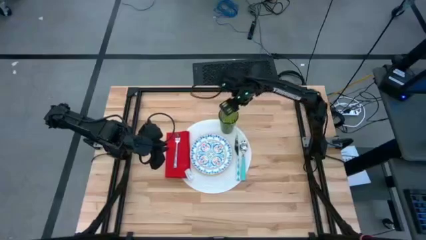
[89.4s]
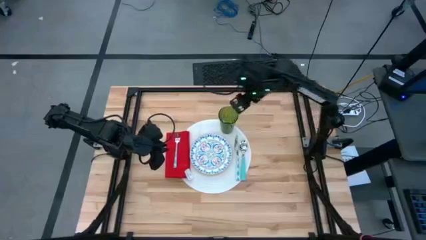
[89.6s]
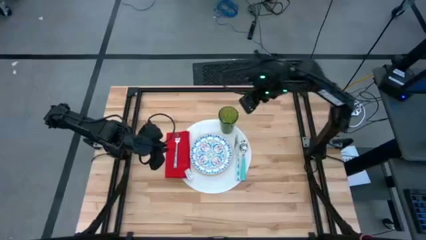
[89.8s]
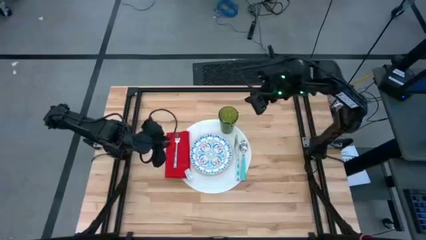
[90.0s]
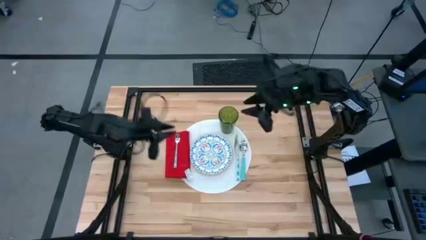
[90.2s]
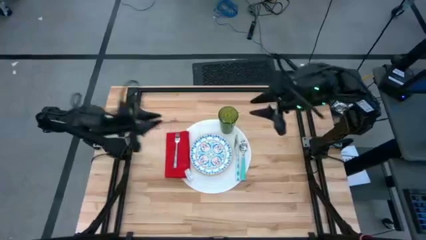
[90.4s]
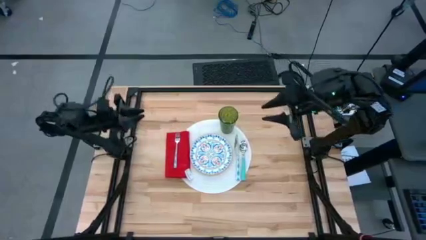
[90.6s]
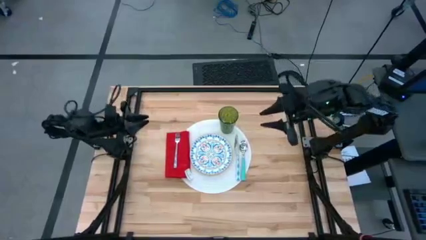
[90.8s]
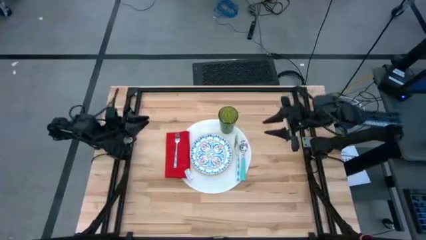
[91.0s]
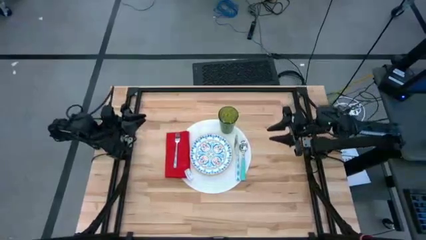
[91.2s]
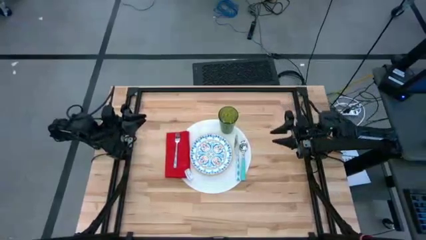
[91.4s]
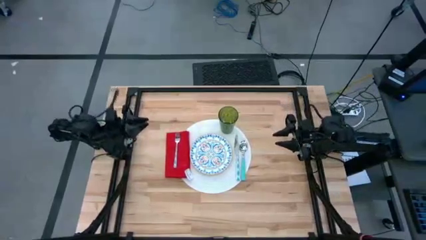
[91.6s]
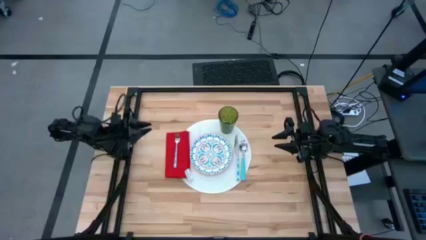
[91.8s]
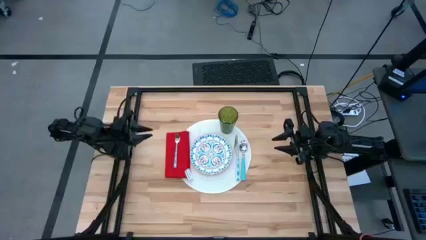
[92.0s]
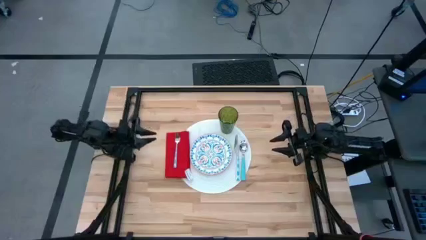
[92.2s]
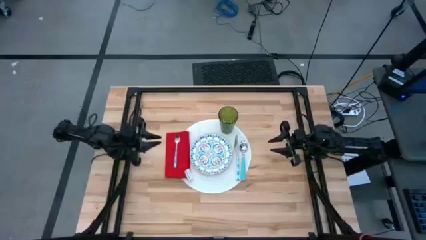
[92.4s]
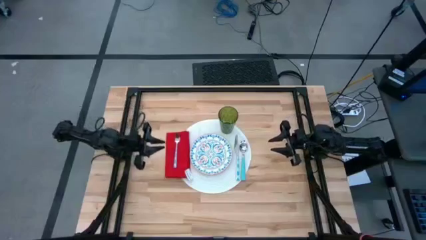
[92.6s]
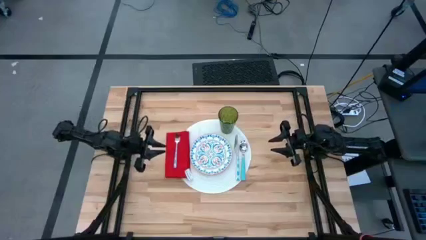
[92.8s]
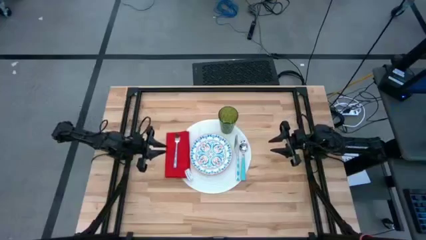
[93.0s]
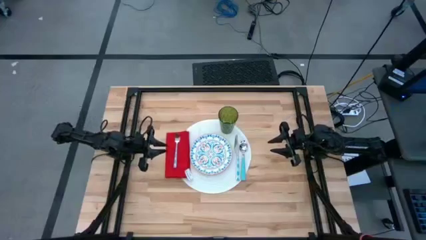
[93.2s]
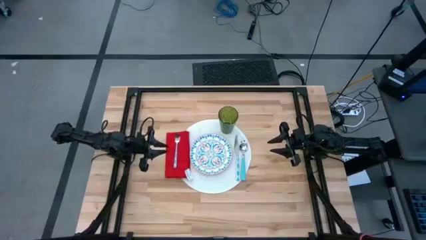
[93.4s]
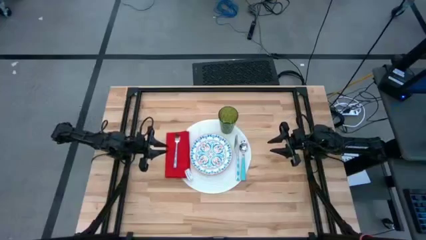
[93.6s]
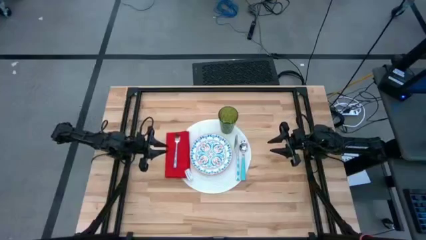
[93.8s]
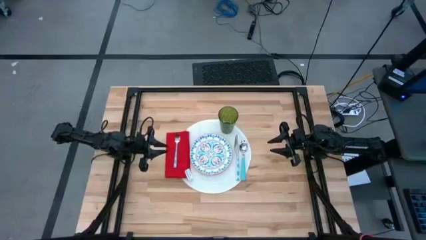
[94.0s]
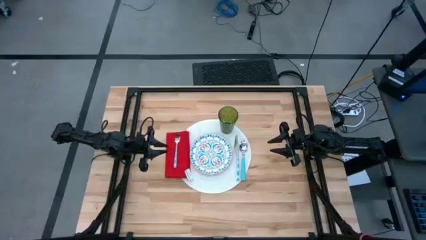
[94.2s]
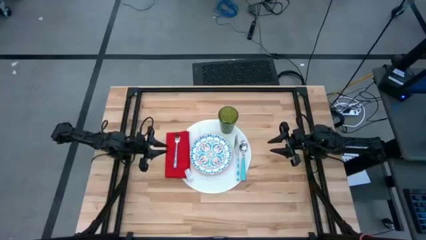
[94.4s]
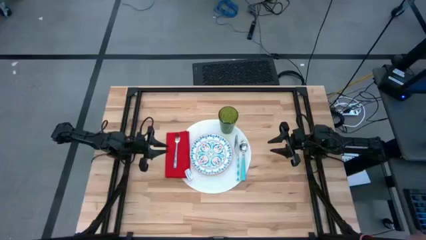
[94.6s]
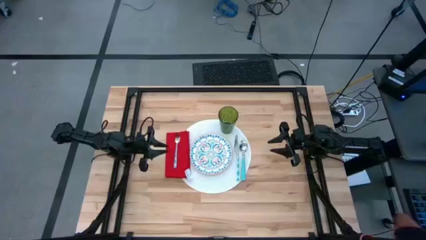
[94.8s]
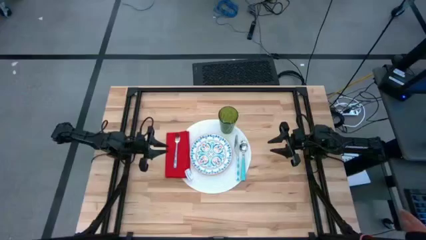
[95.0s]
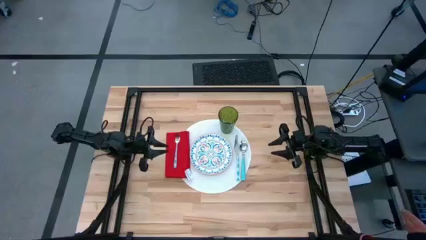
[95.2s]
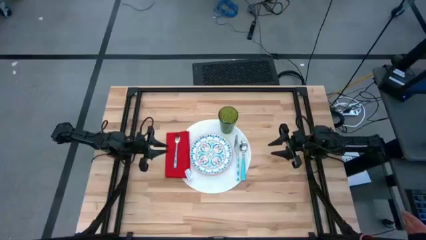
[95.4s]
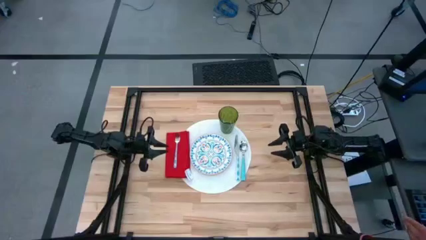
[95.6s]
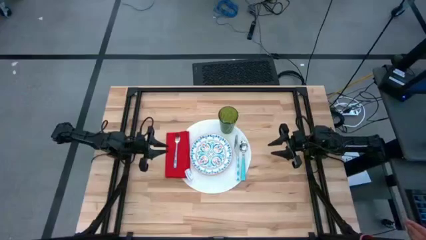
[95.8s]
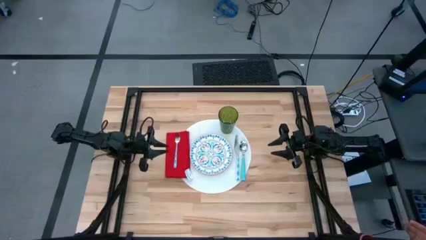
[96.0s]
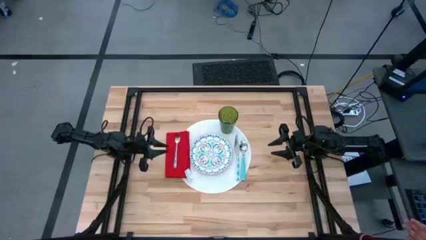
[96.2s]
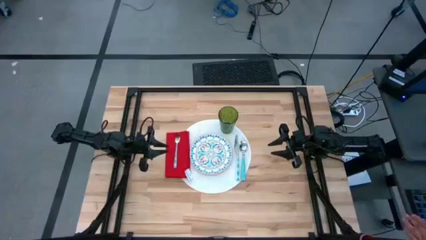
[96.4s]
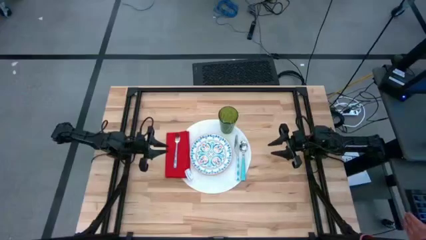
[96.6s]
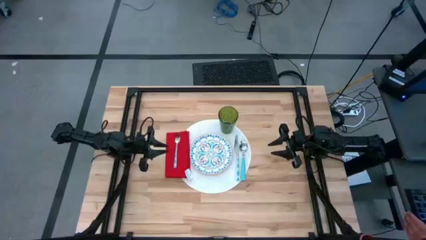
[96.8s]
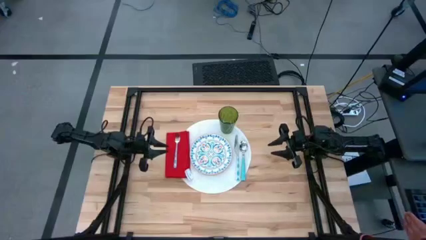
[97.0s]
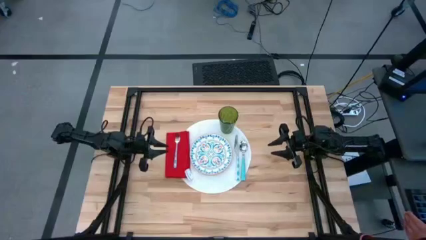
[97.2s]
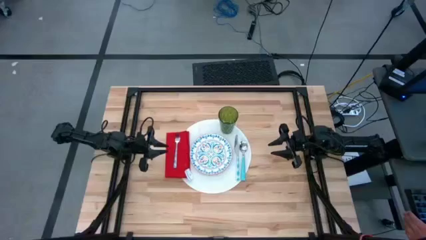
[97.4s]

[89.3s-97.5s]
Task: Set table place
Return to Home Position

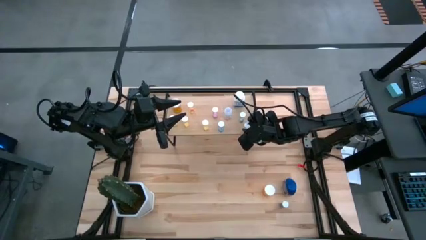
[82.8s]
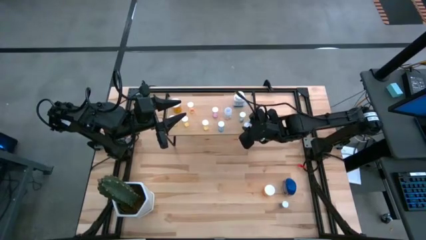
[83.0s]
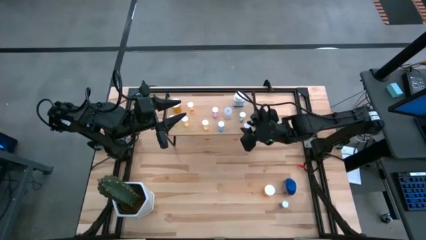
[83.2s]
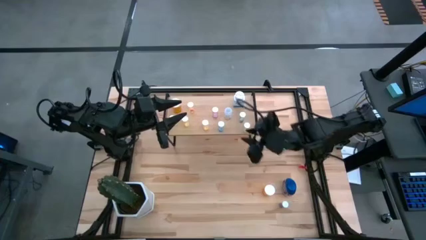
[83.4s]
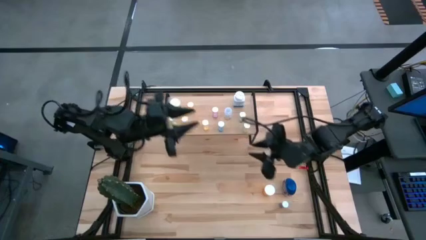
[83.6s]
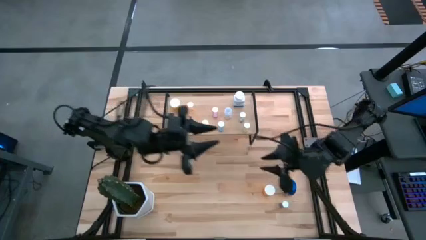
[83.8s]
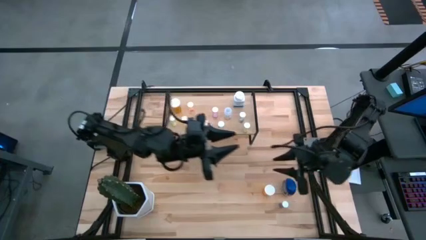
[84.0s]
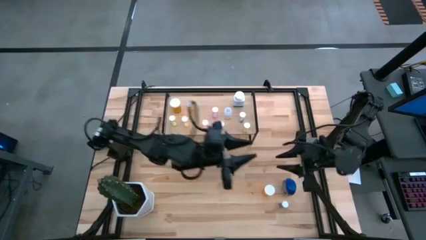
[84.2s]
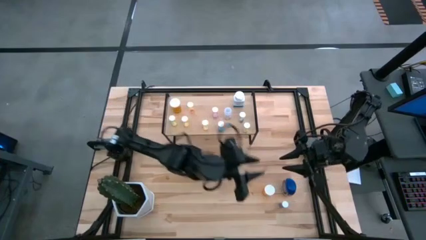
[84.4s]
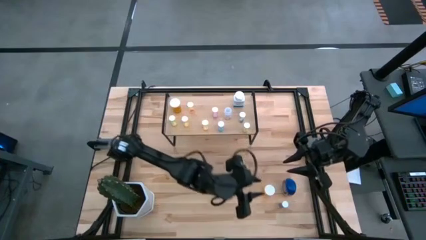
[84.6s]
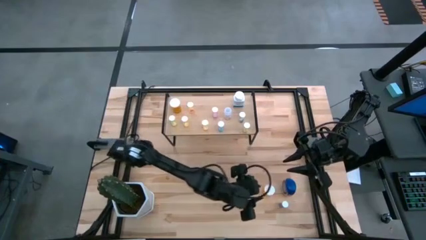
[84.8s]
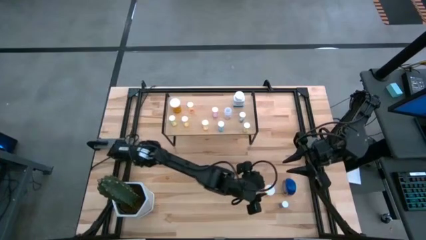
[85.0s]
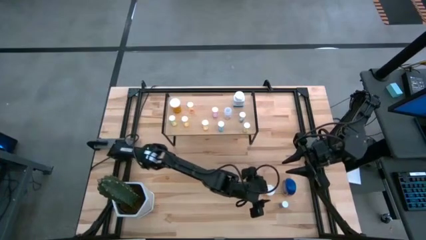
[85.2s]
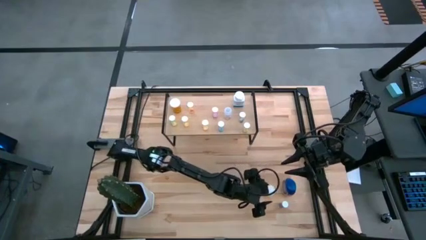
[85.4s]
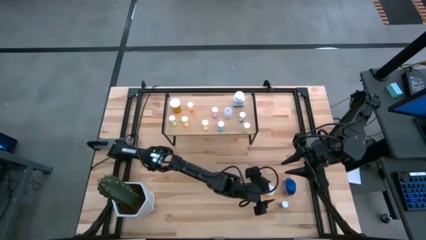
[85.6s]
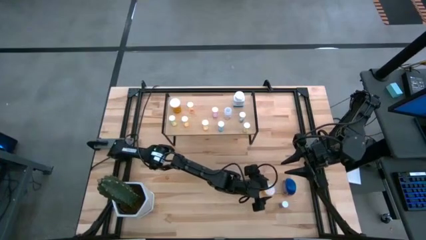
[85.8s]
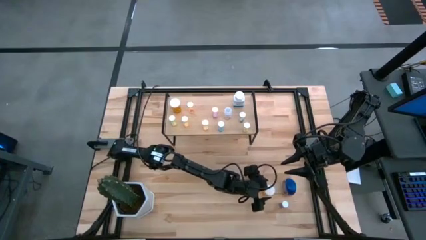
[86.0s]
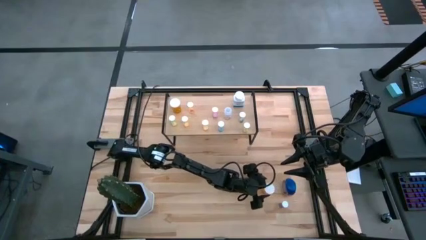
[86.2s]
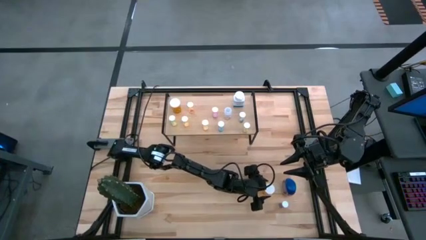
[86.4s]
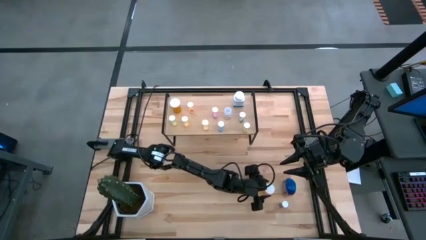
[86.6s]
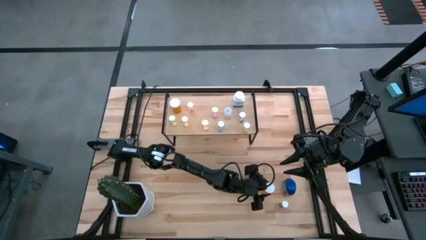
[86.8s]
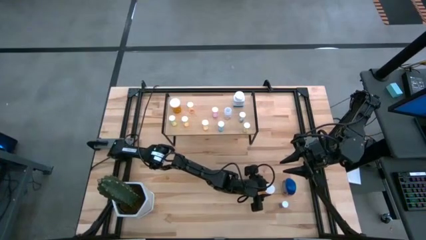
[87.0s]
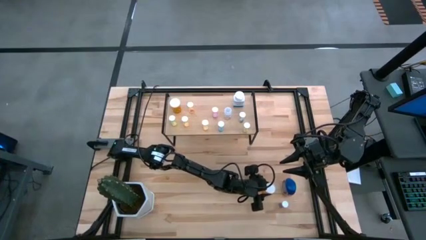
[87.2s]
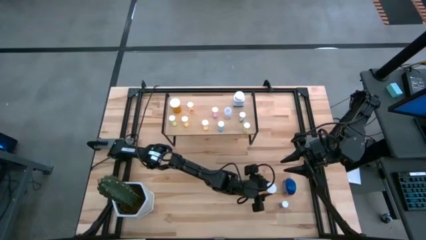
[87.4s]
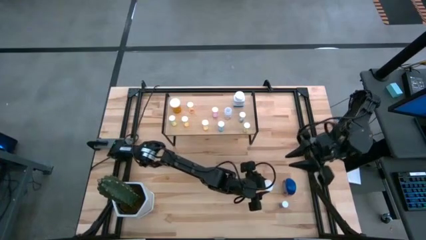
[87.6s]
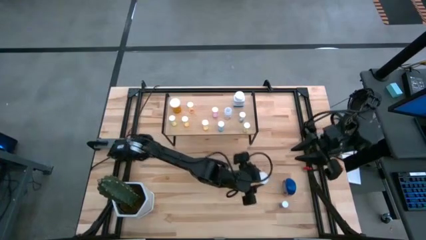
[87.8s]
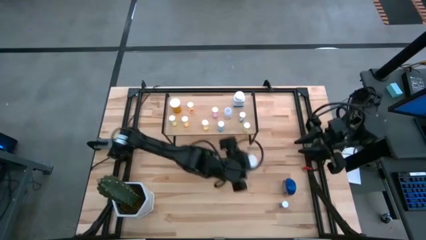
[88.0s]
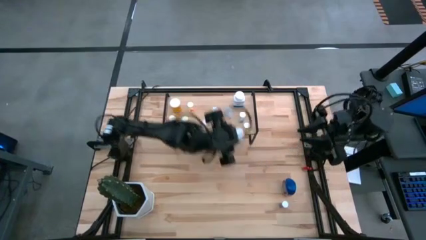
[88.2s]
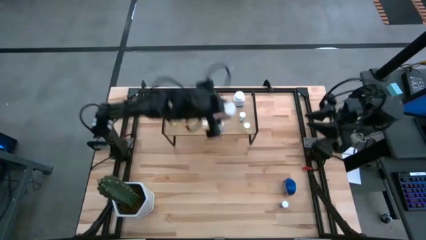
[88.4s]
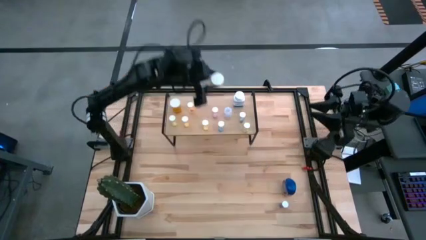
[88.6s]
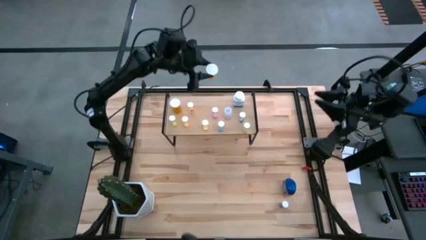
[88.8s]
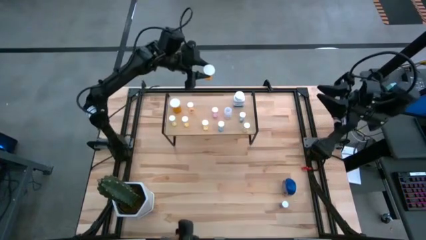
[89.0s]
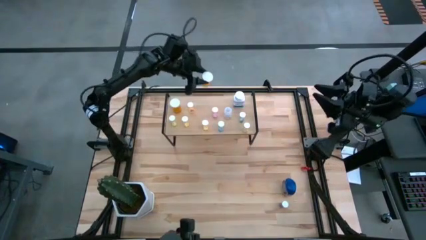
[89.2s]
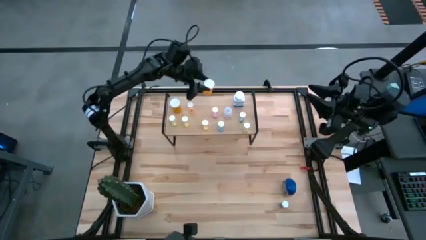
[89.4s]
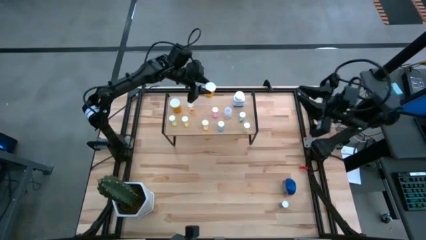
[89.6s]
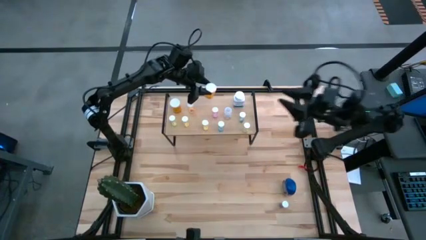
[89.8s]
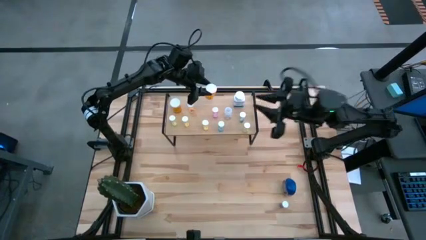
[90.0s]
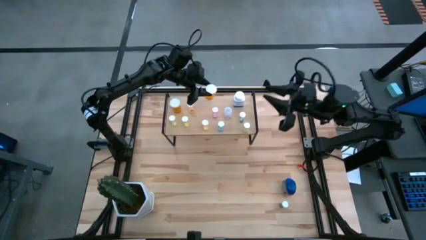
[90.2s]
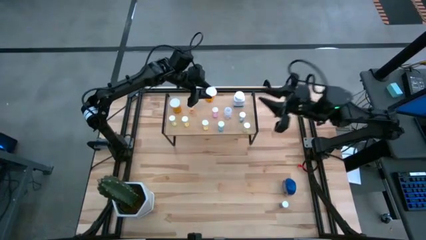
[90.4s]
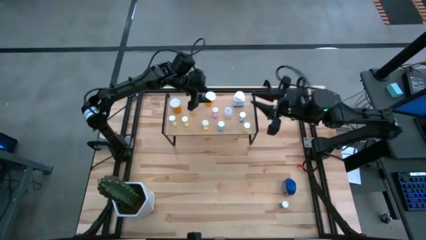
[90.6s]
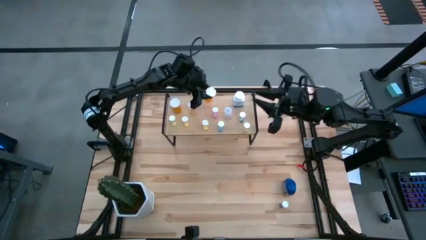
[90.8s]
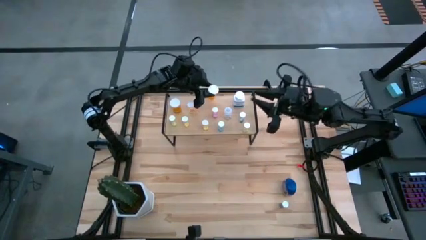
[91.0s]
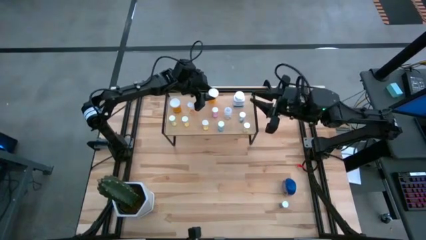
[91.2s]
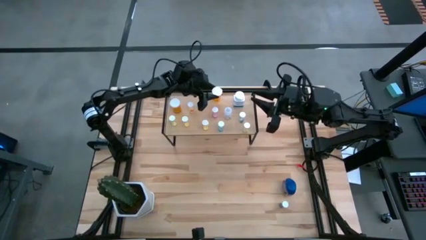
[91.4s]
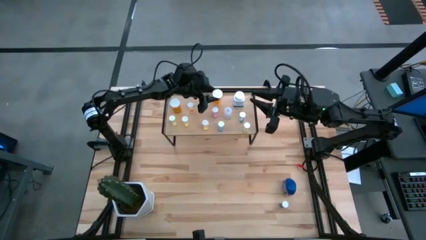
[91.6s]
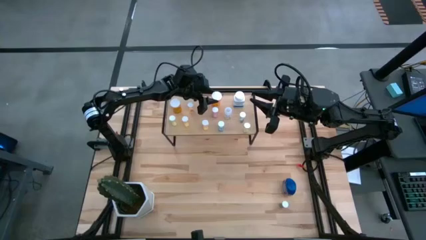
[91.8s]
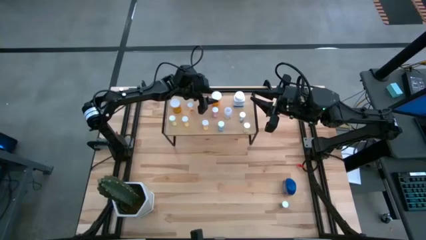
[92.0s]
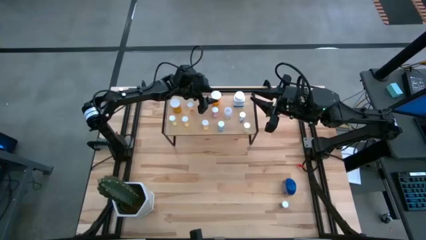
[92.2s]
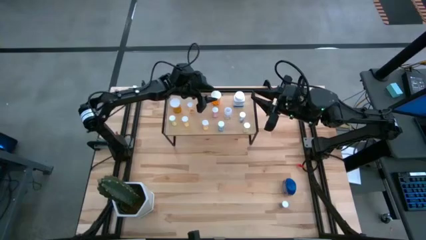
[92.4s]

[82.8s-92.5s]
Task: Pick and place medicine bottles onto shelf by color
Put the orange pill bottle on the shelf
